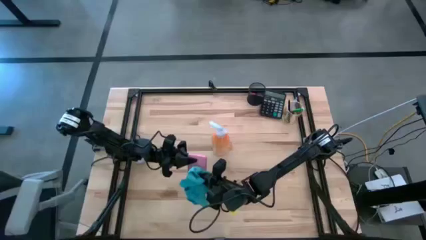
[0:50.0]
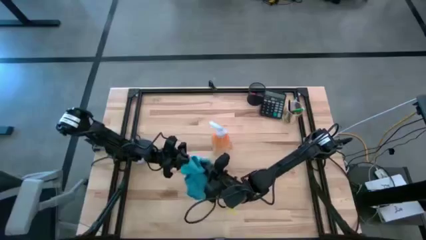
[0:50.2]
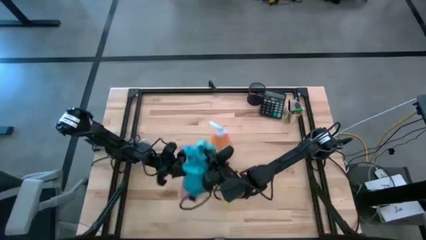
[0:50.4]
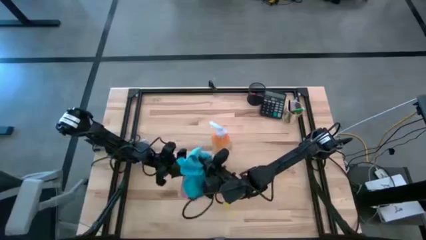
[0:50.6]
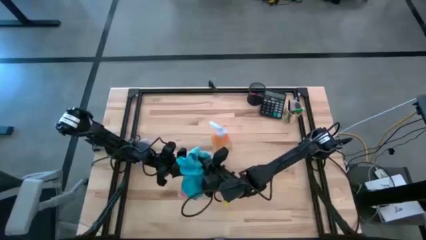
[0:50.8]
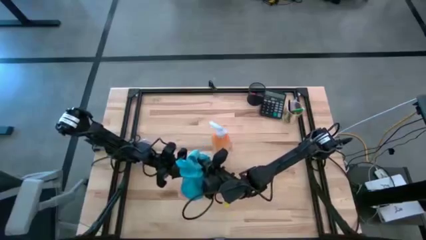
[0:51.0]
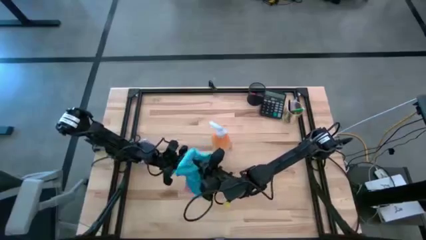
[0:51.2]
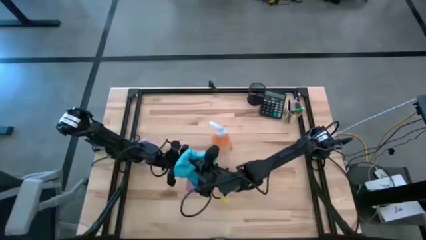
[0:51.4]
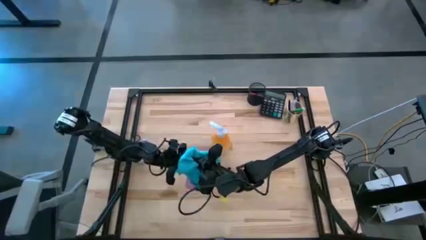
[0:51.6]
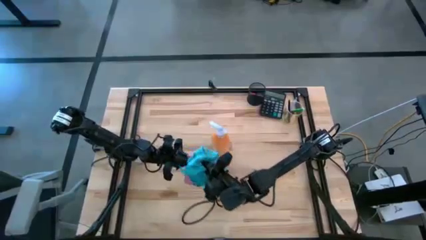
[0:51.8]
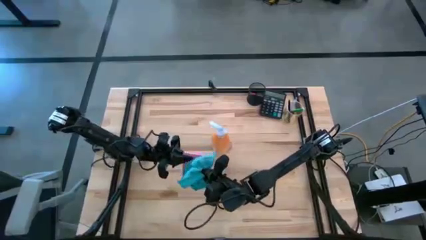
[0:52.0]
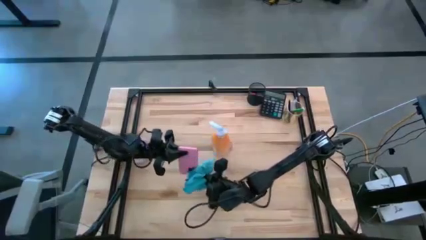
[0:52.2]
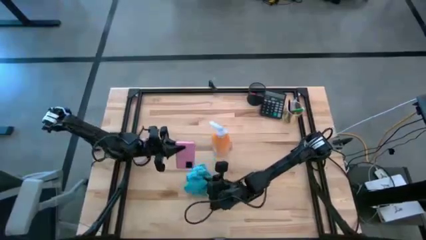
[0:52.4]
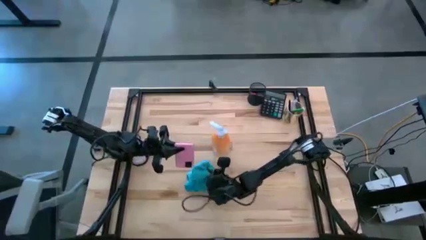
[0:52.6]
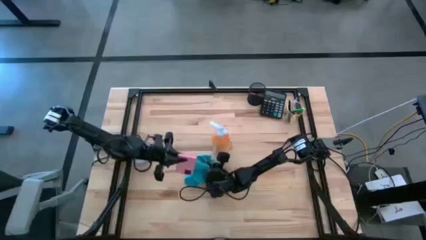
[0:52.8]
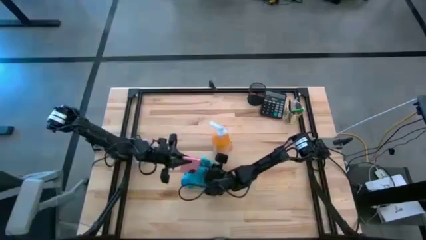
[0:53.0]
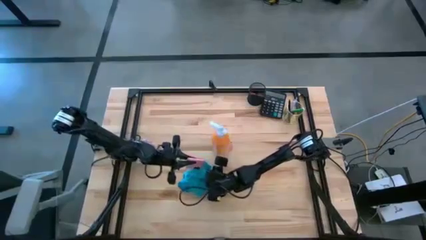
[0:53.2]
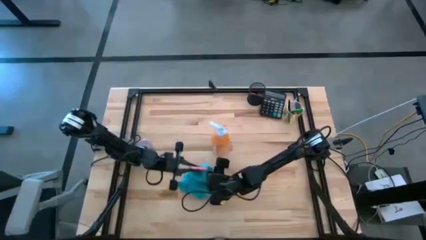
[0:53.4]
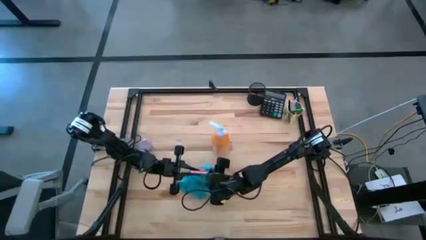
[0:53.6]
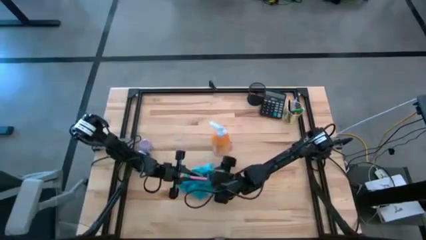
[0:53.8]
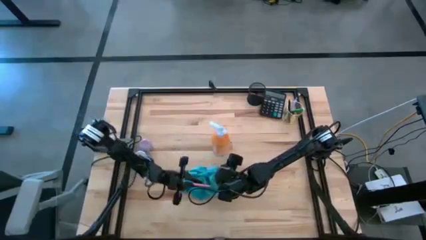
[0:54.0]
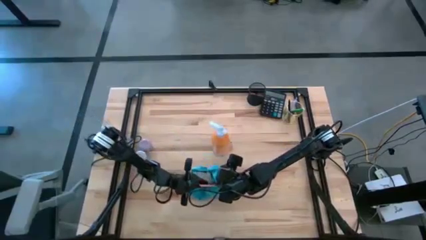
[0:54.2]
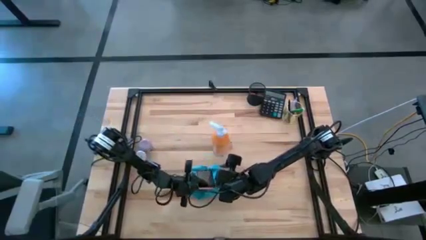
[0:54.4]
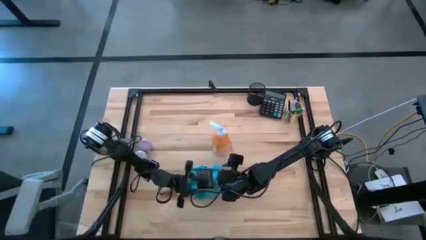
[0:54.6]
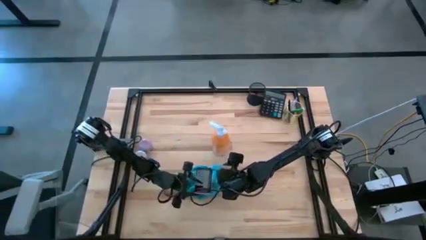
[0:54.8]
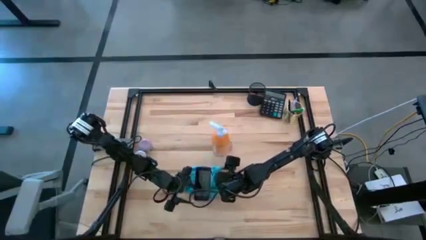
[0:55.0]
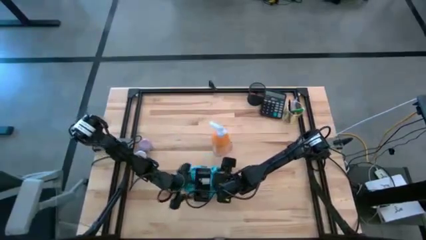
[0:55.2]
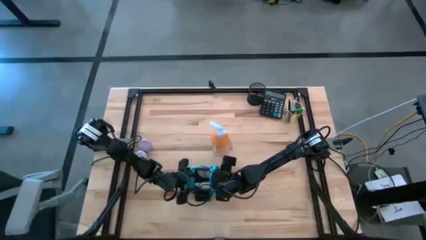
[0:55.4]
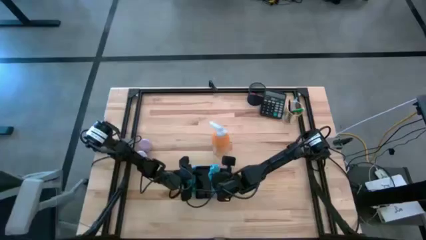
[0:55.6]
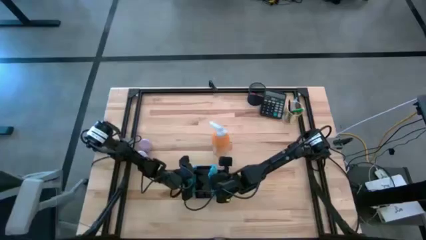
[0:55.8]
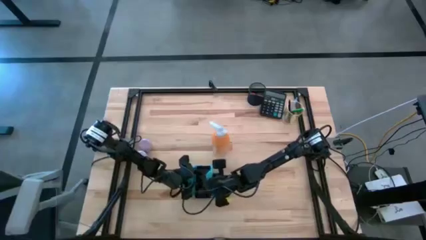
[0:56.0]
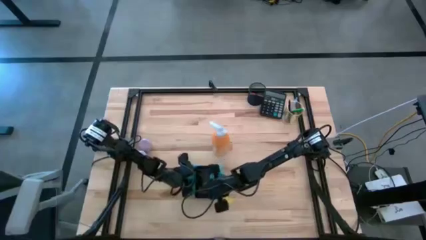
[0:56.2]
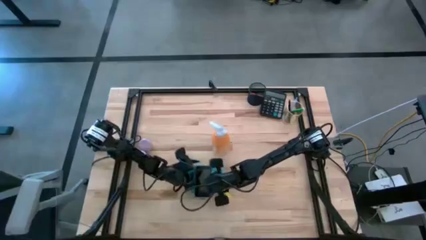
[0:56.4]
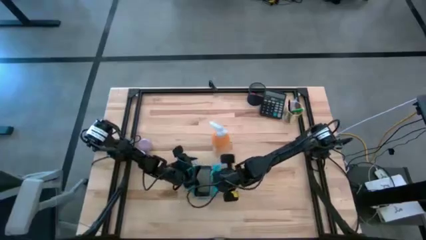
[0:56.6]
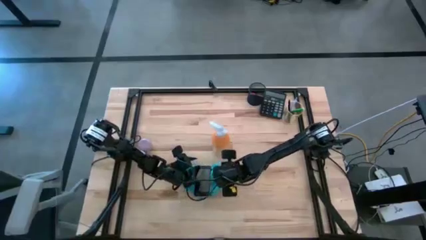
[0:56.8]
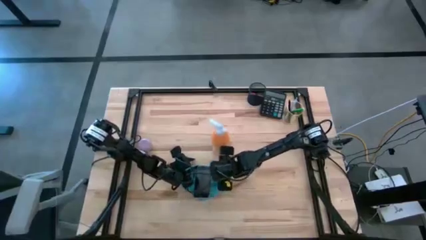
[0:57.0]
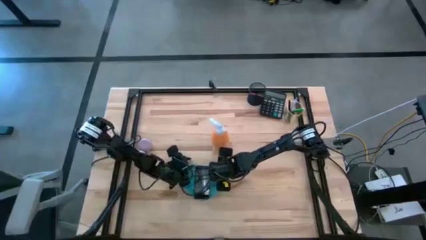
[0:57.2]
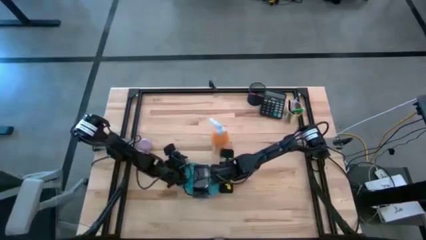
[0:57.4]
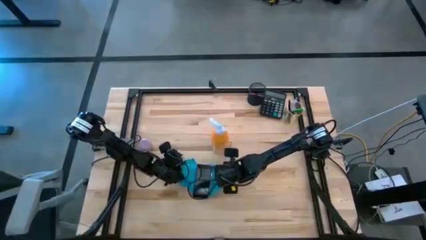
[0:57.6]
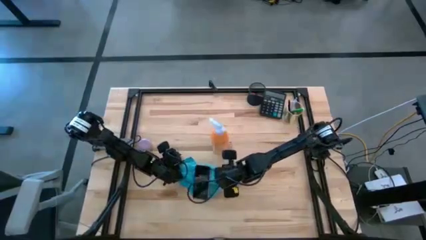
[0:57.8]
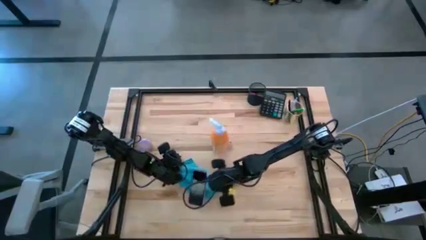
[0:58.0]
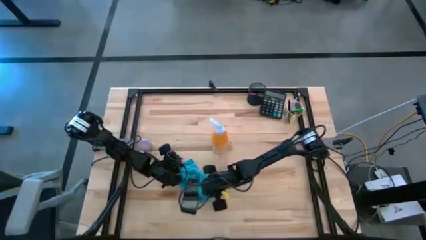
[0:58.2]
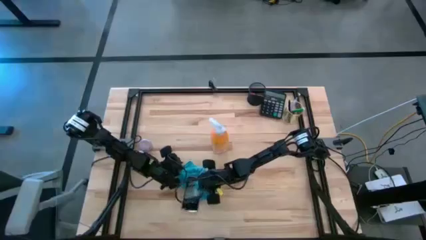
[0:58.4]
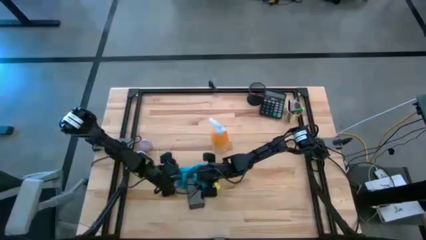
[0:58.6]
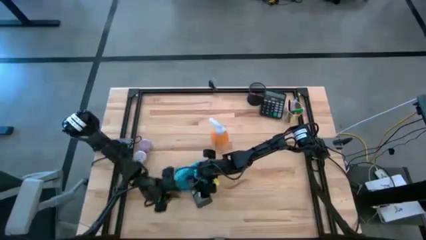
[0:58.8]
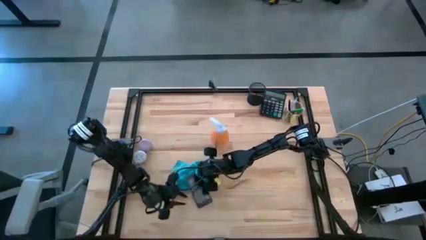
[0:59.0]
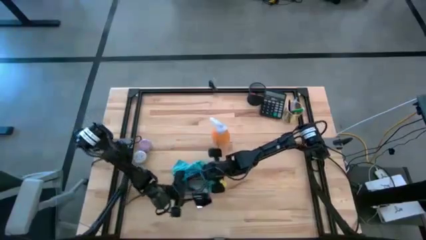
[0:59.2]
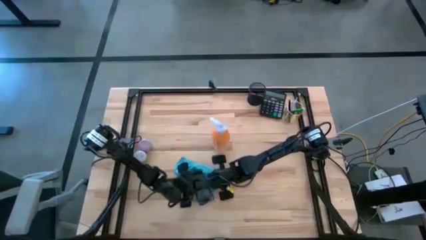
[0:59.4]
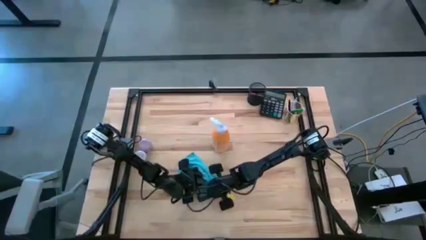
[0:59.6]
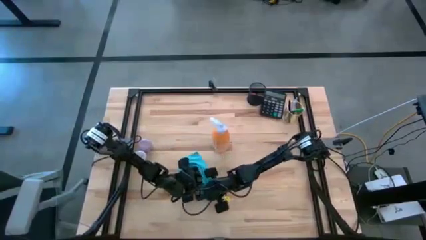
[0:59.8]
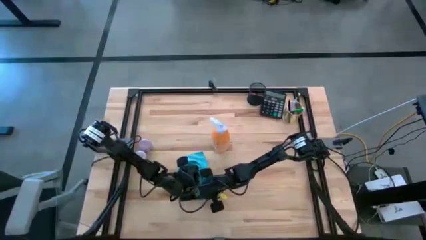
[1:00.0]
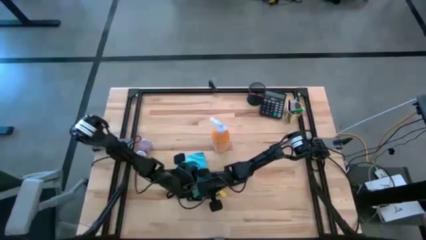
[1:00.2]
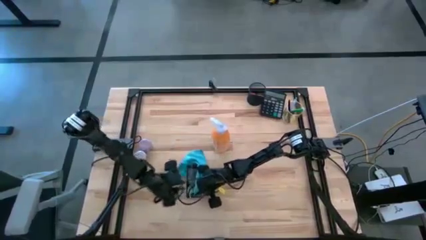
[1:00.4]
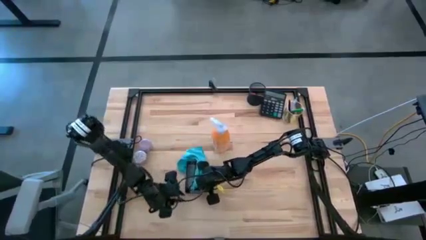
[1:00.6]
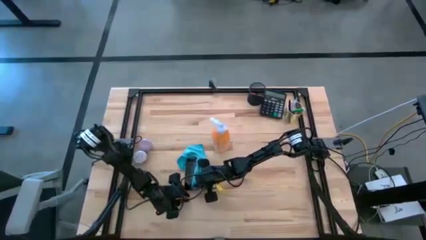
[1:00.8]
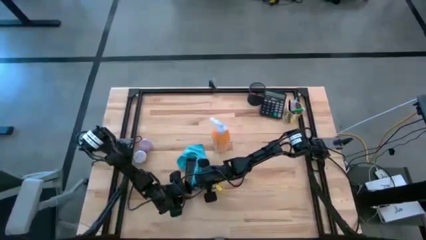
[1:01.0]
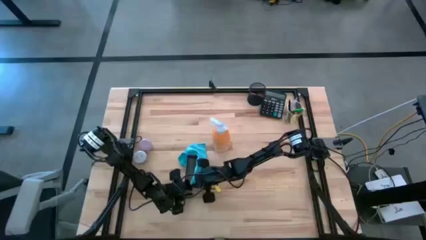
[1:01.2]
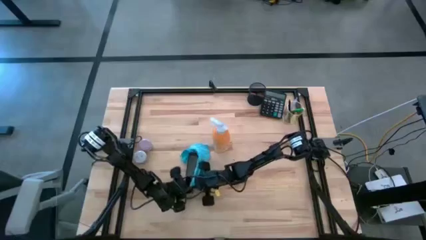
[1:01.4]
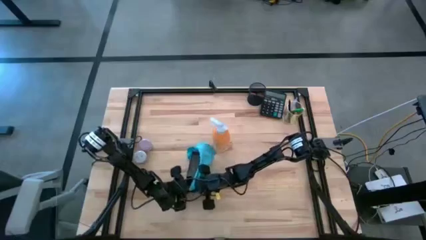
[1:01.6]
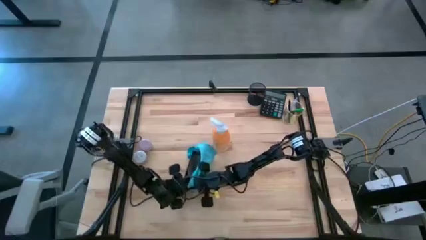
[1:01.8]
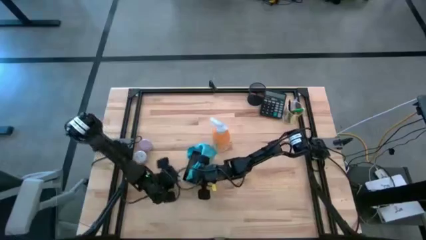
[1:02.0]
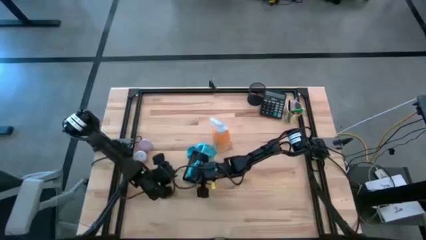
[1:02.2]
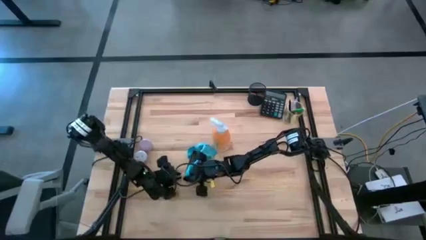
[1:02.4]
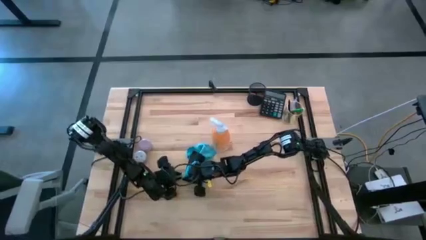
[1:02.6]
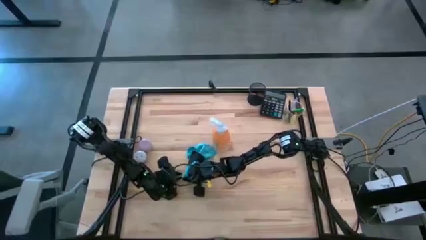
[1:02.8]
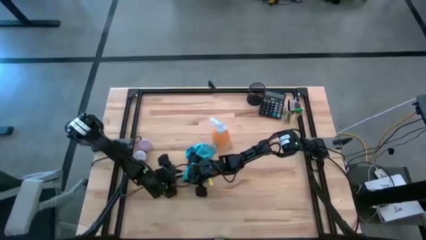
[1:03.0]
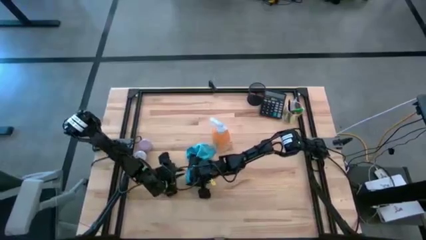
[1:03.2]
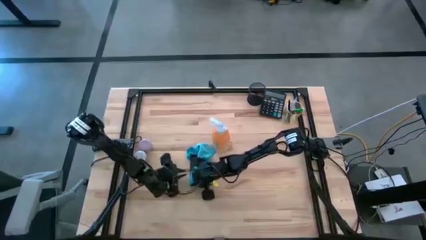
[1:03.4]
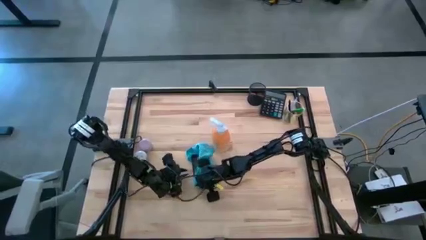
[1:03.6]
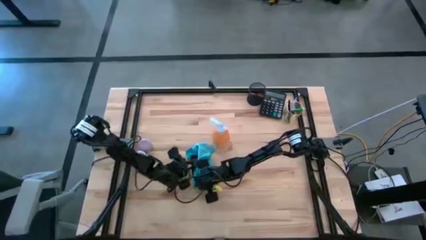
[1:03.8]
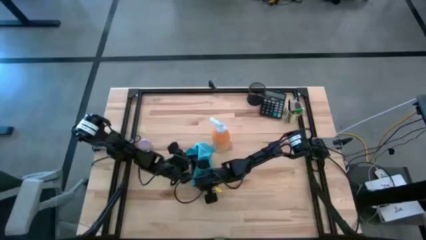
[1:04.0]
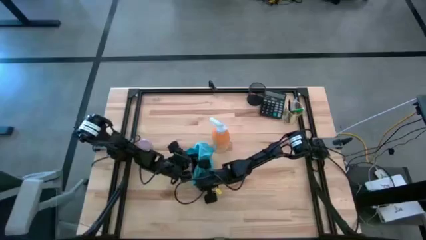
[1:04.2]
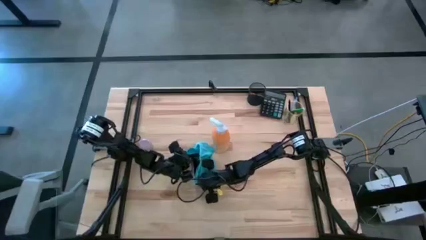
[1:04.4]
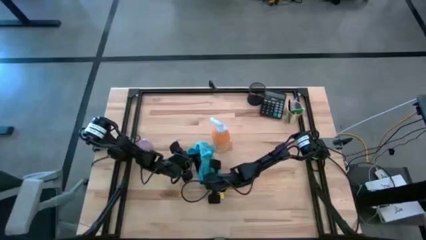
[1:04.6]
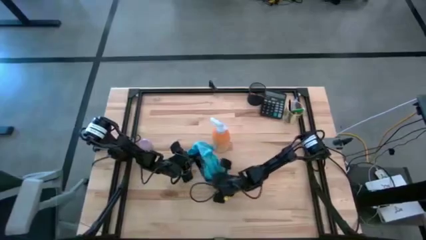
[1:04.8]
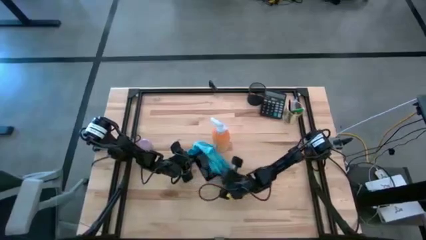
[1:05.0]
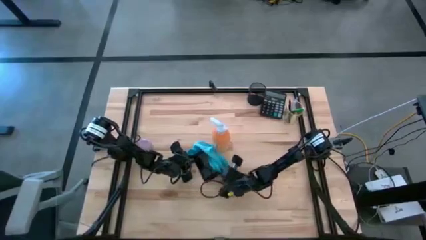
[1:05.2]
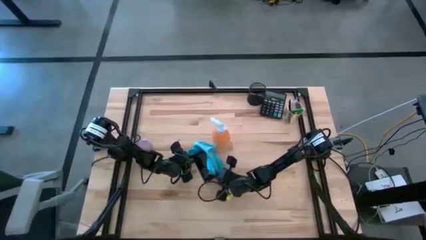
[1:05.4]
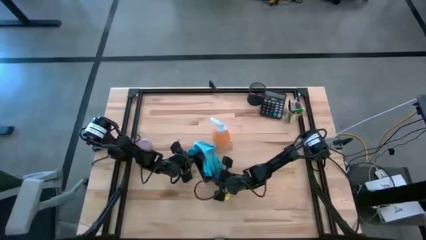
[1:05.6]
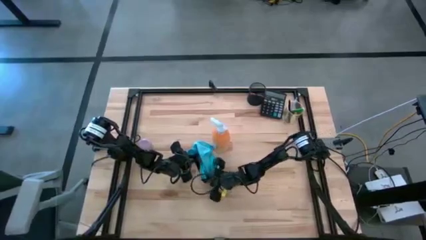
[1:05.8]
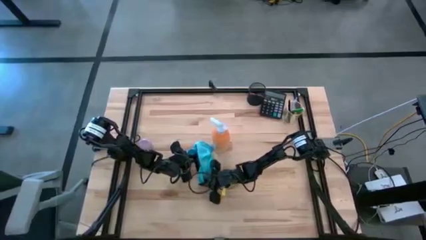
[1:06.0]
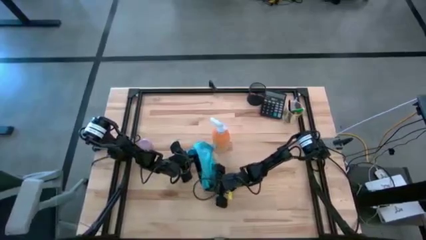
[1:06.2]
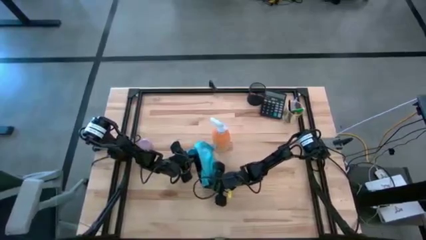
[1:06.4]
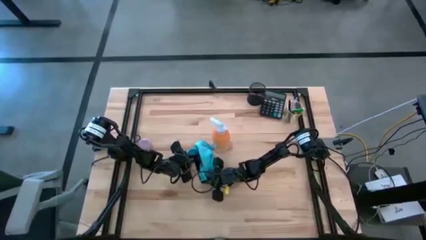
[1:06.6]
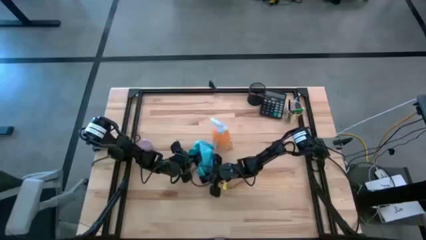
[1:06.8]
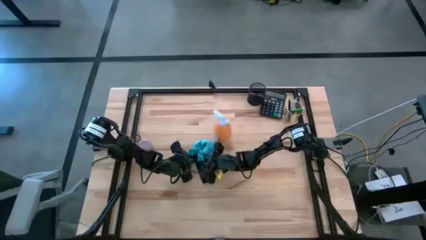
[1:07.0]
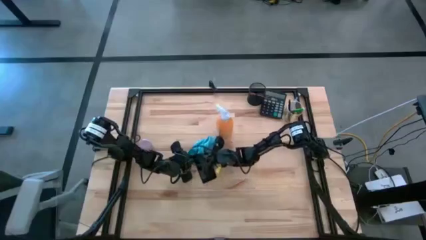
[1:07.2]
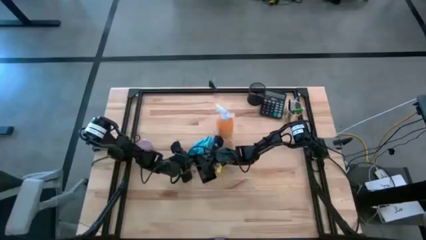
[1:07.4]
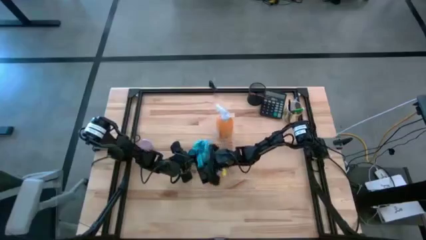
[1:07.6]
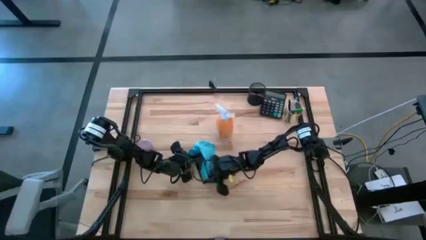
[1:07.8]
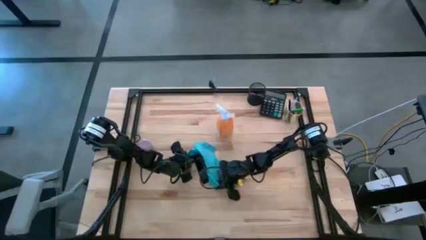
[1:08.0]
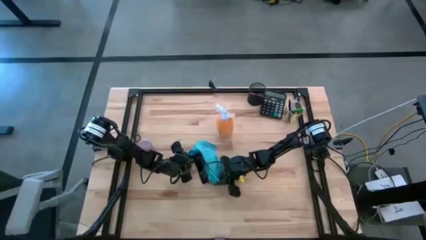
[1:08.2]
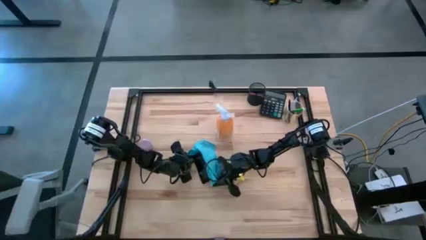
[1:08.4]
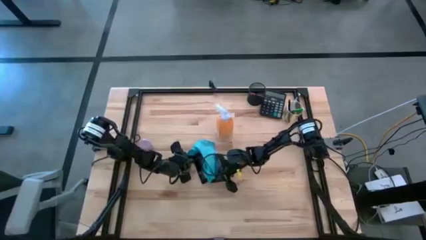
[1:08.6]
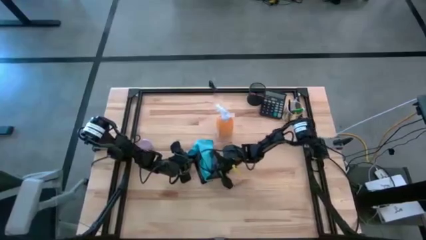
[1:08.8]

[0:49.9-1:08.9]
Task: Apply microfiber cloth
Wipe the cellphone with the microfiber cloth
